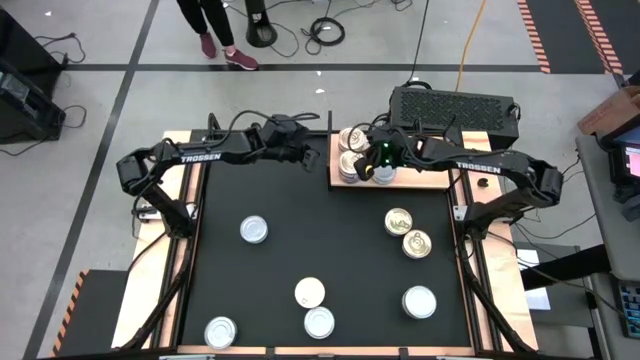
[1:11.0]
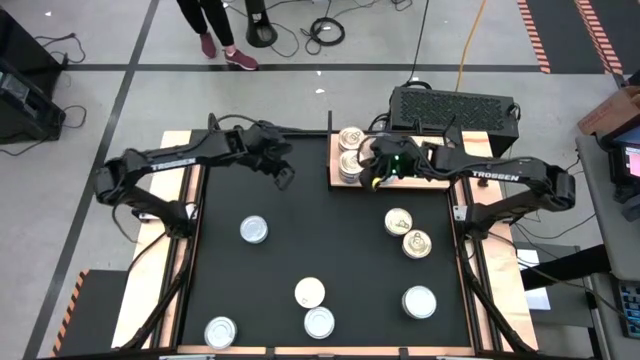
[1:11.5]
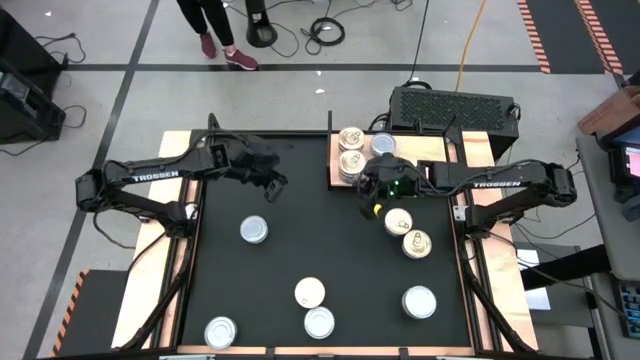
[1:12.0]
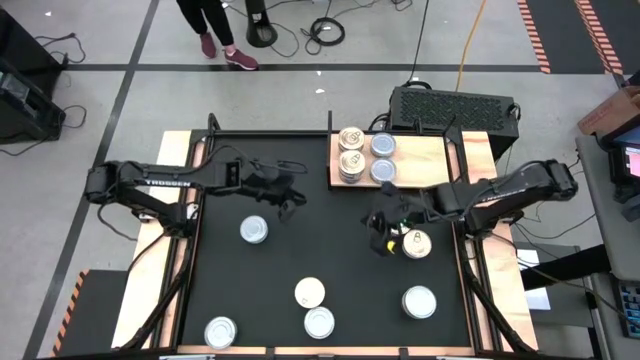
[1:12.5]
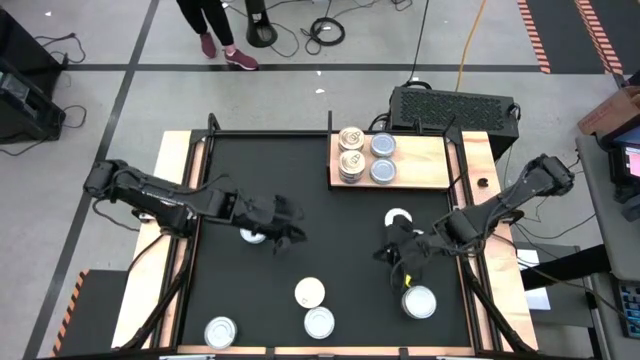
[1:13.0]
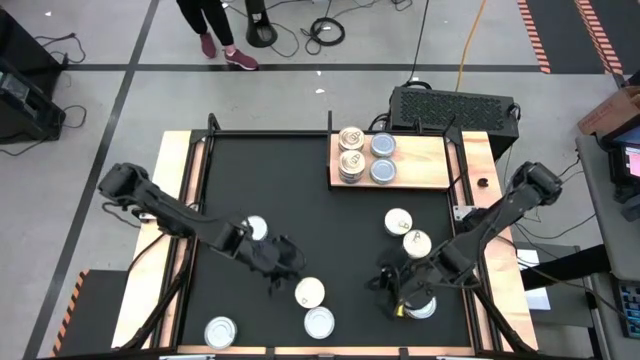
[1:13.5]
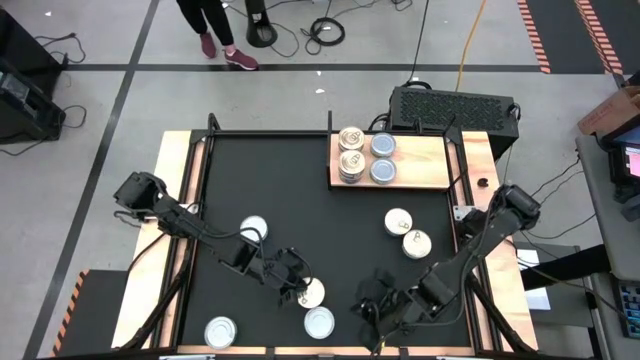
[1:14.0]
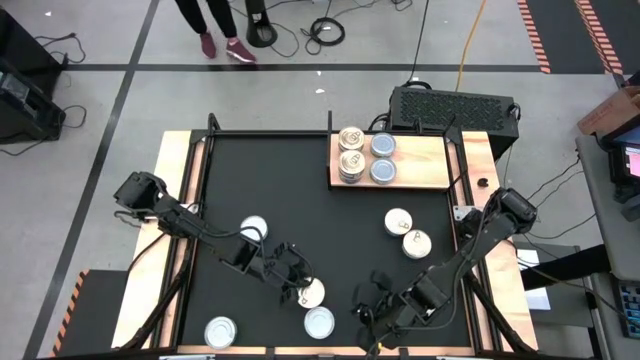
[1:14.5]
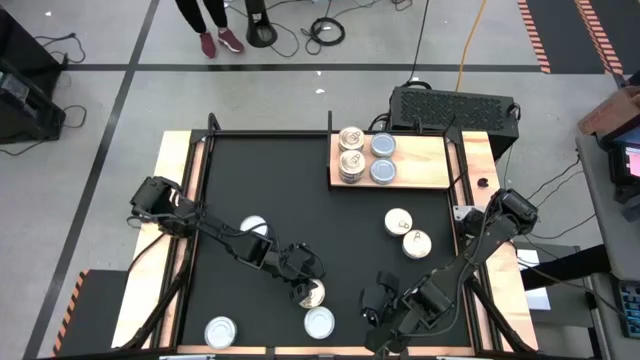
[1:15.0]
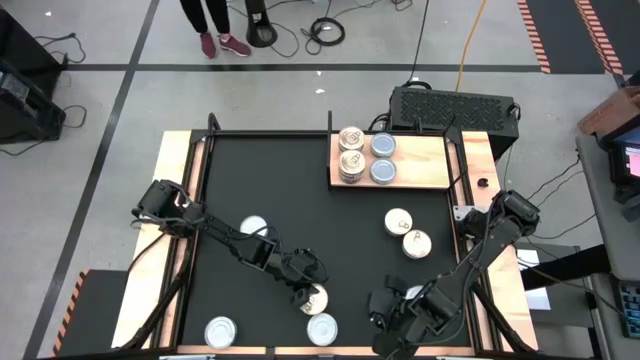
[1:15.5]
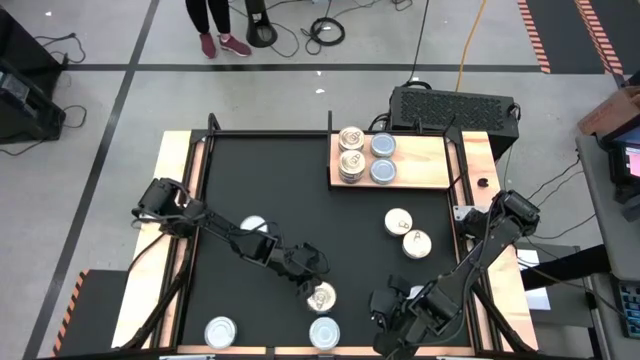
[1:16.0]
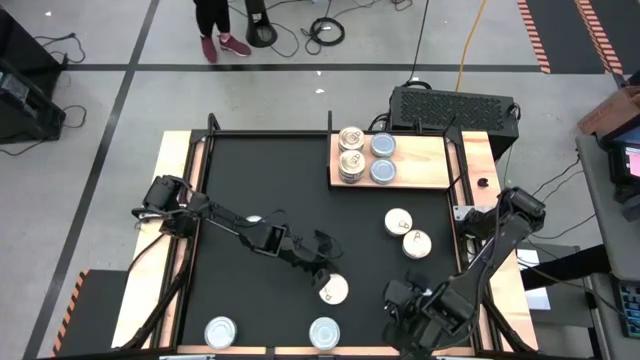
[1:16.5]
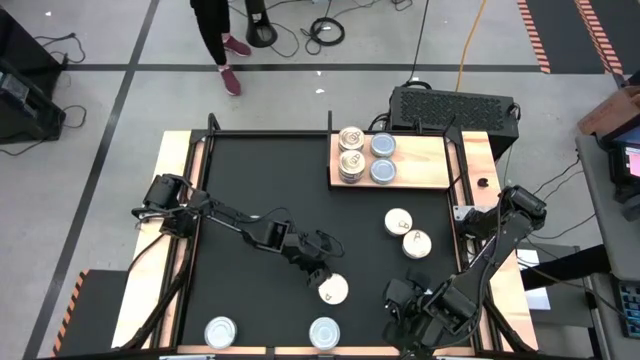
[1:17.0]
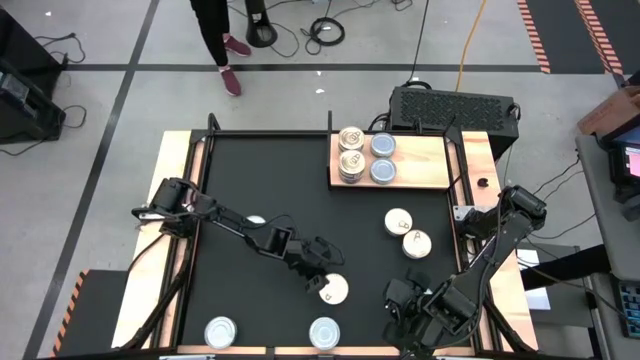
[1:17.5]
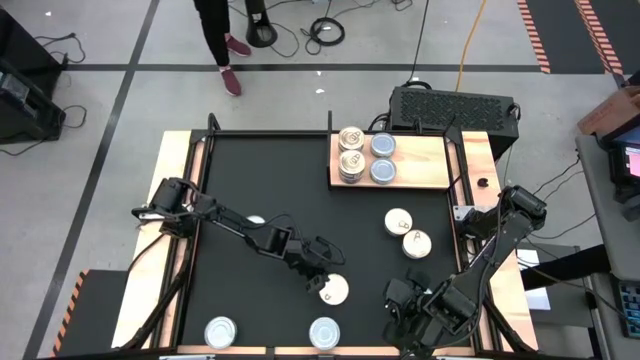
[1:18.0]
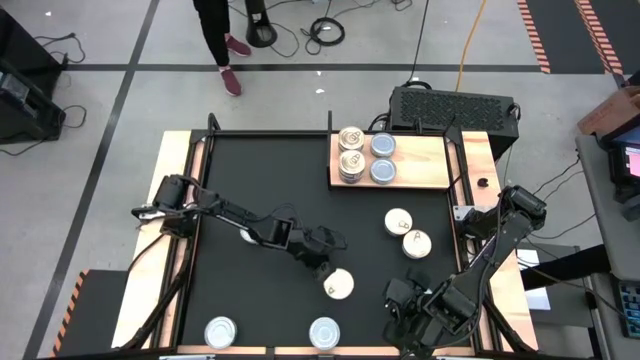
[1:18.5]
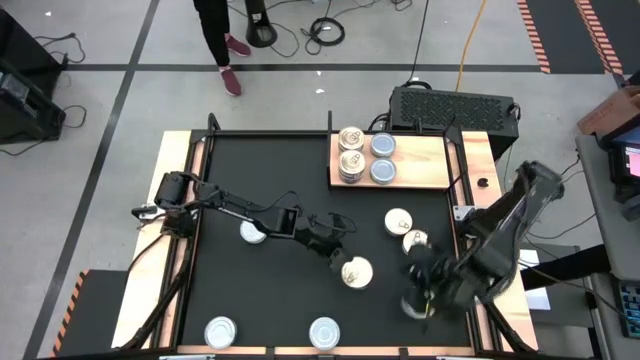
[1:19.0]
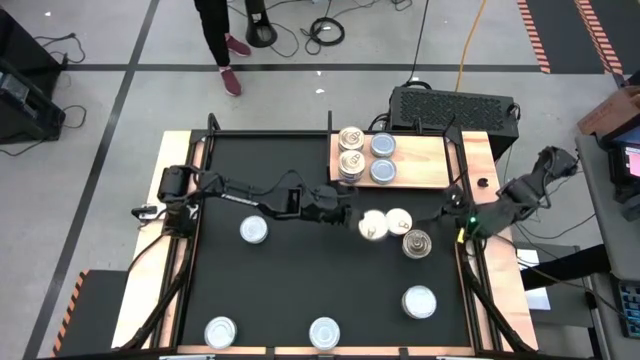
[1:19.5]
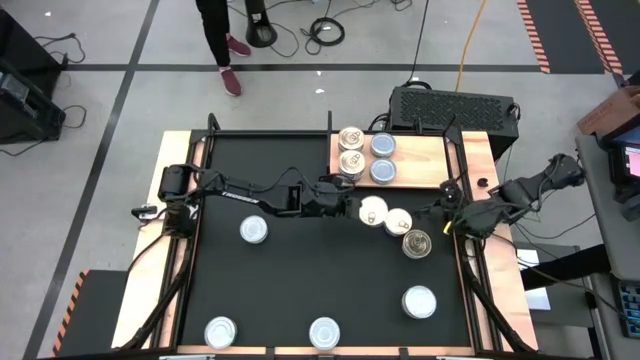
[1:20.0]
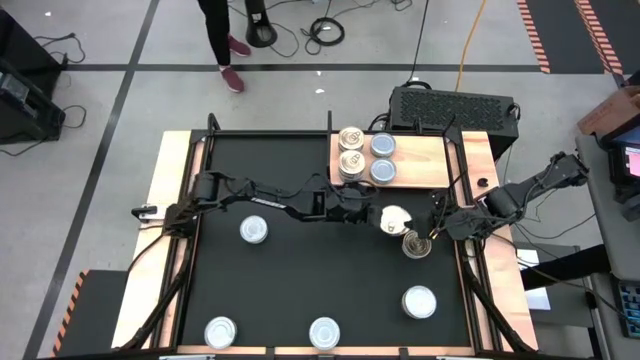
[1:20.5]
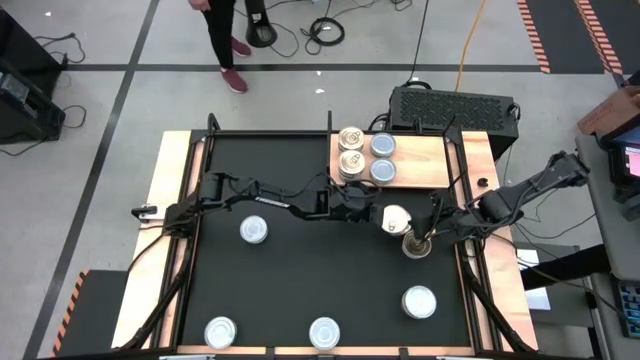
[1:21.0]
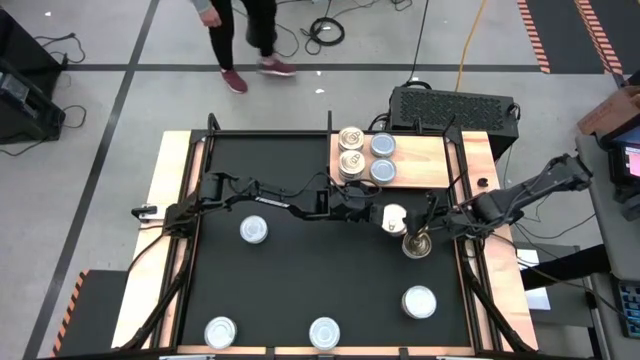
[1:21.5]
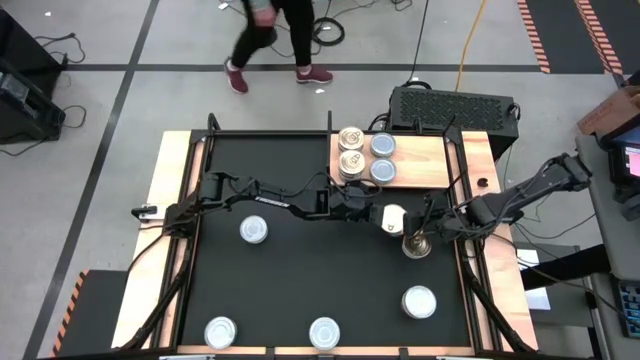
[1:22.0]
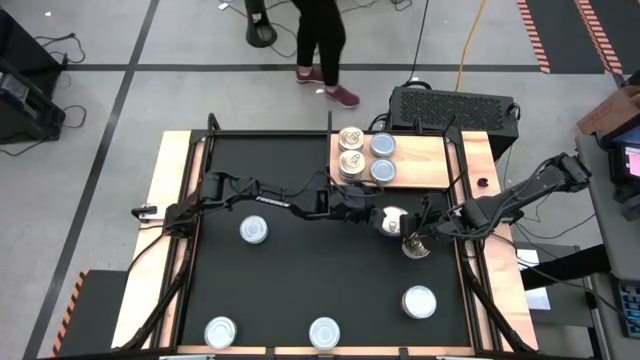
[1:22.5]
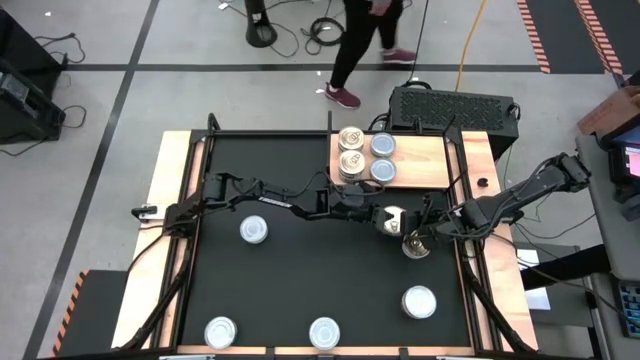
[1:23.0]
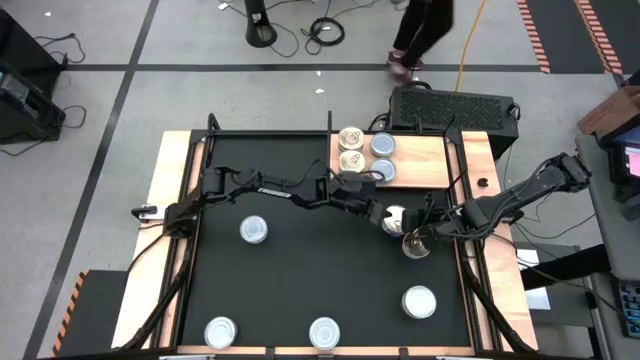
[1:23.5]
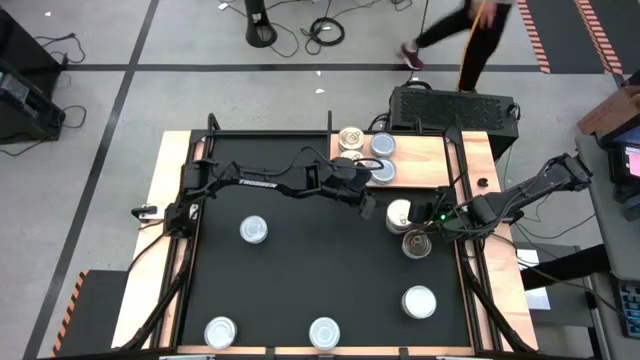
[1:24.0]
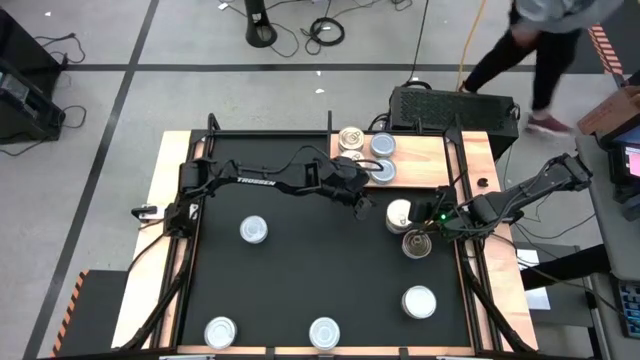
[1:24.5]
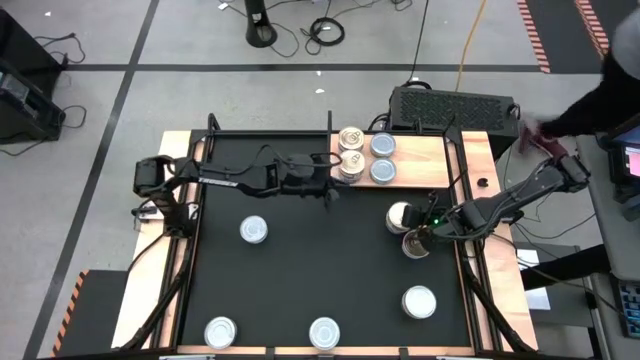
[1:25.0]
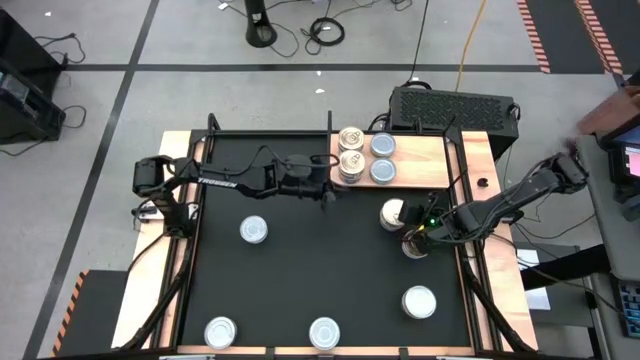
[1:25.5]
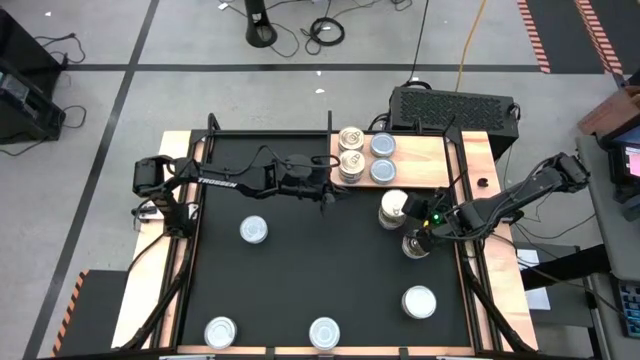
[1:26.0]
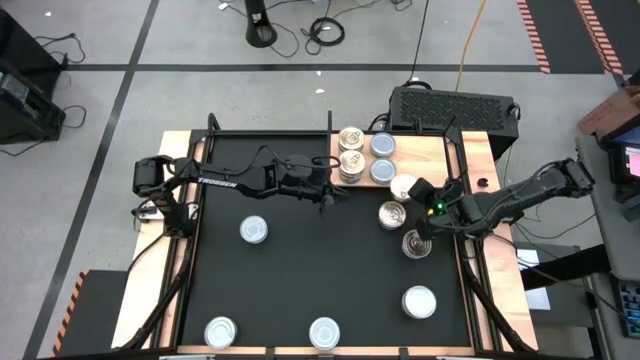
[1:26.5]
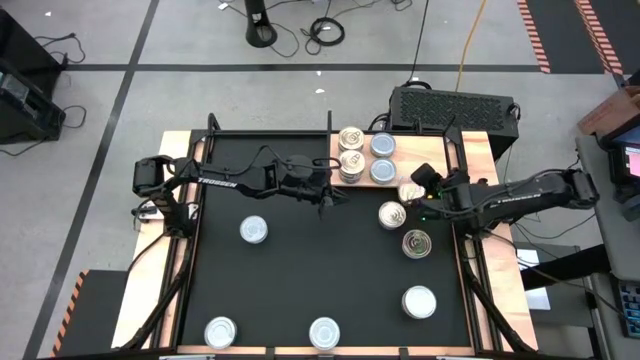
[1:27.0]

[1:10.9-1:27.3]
Task: Stack canned seafood by type on shelf
Put the blue tuna can on the shelf
